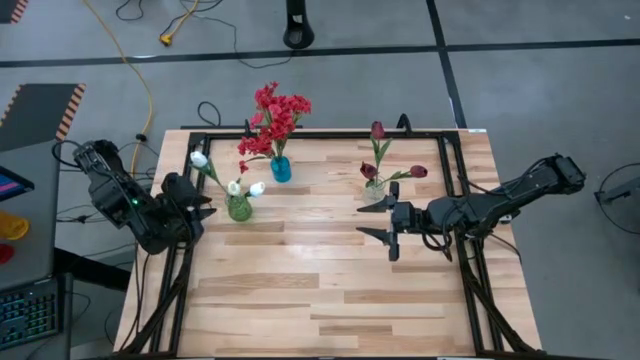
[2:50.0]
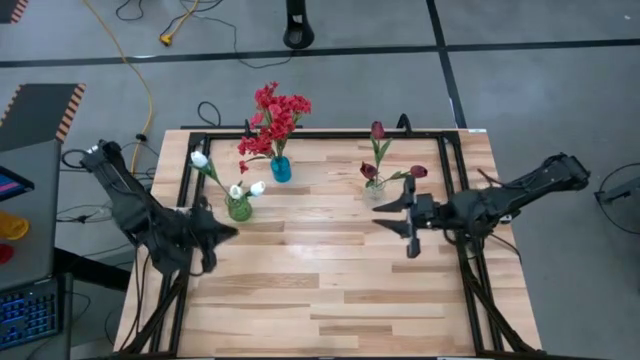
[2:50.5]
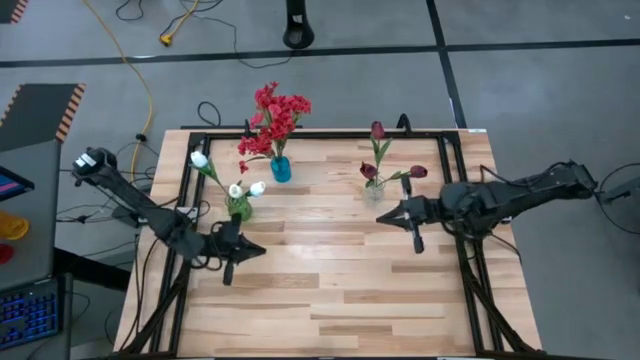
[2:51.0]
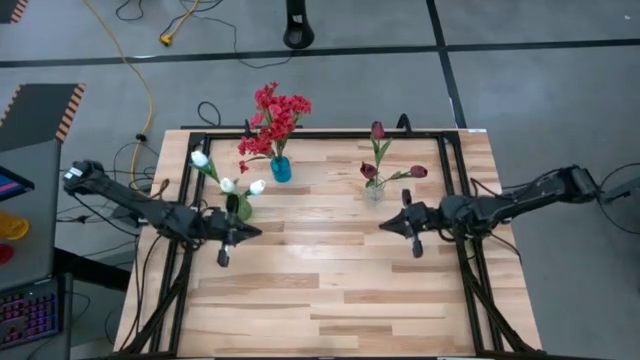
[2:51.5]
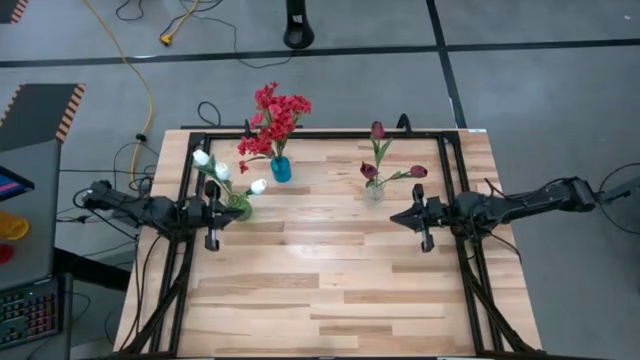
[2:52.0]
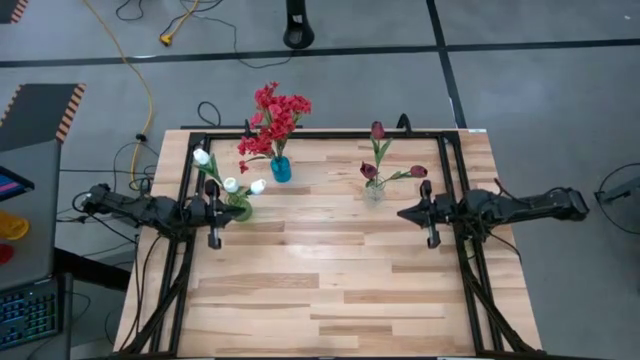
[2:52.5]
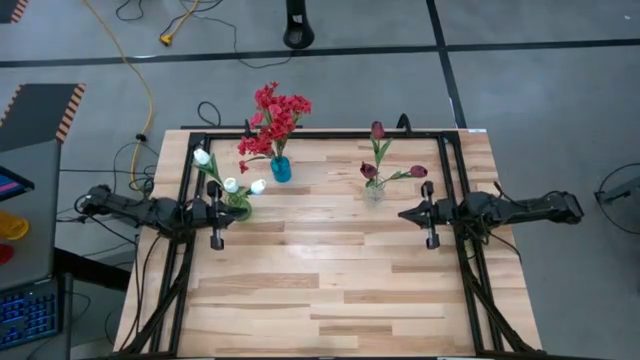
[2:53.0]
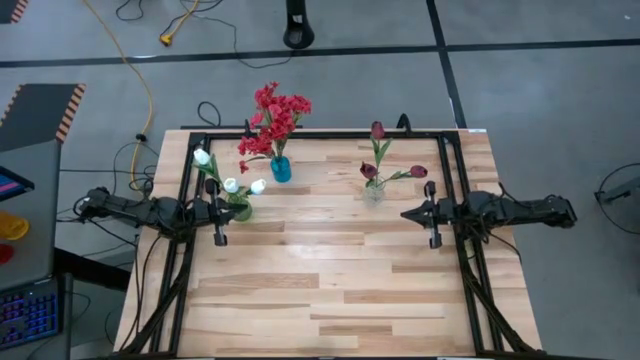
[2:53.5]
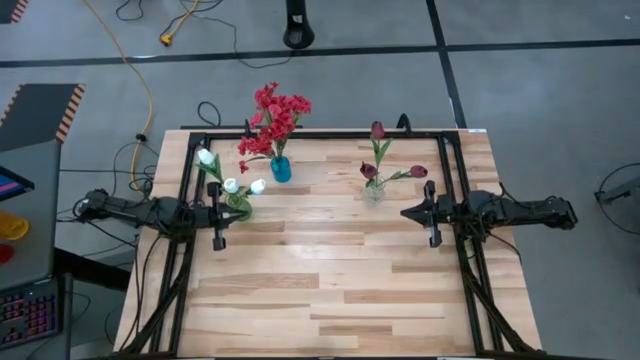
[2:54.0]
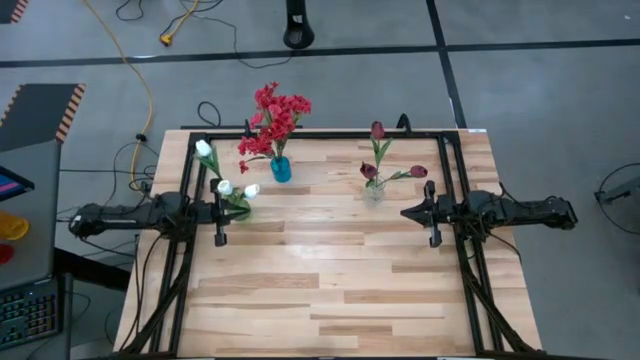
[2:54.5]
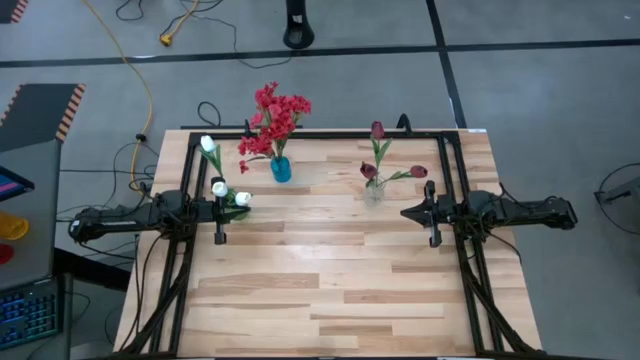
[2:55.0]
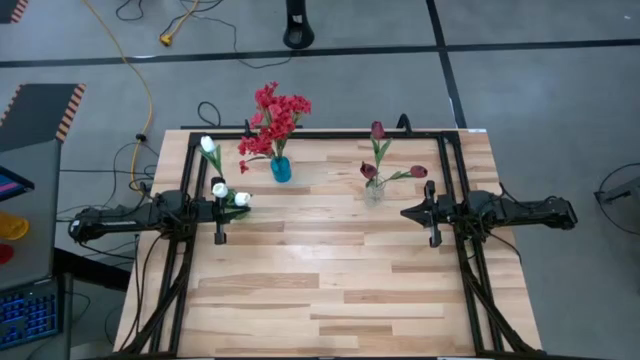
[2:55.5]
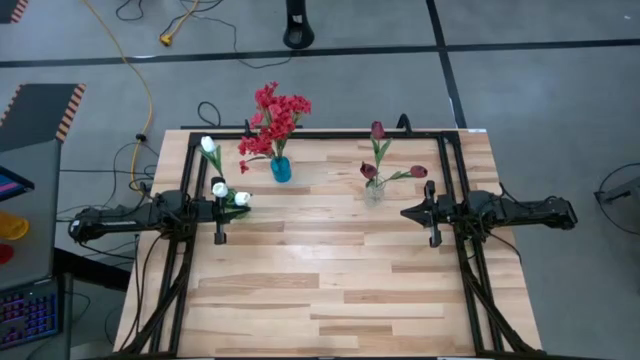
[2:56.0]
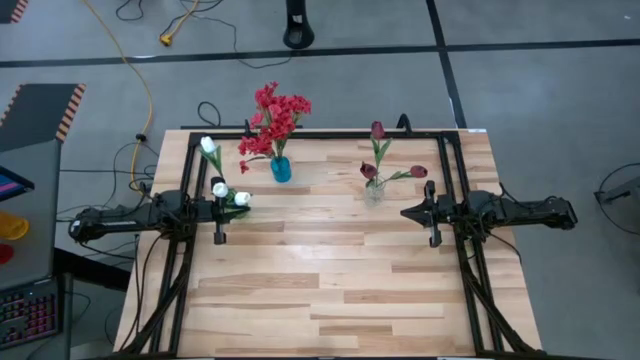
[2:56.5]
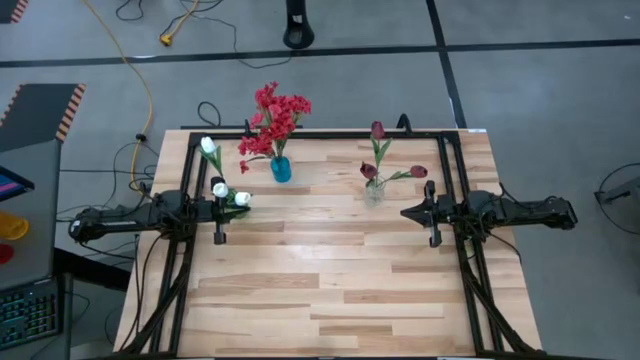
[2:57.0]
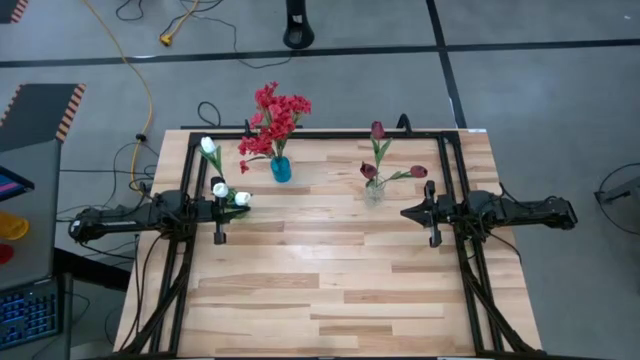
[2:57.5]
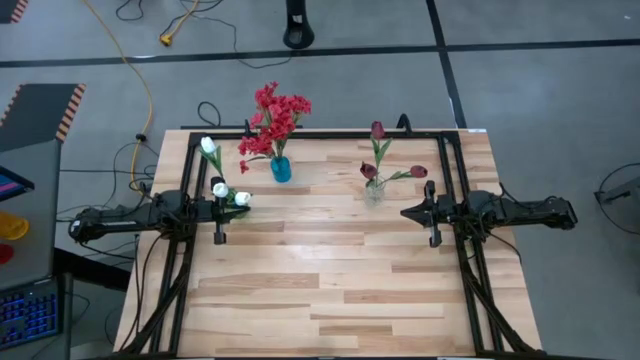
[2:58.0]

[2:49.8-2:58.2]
Task: Sort flowers into vase by color
Return to Home Position

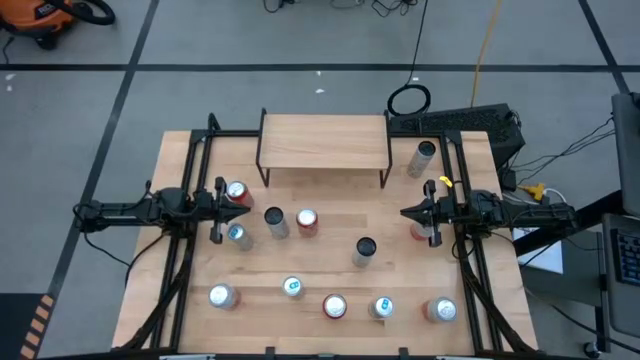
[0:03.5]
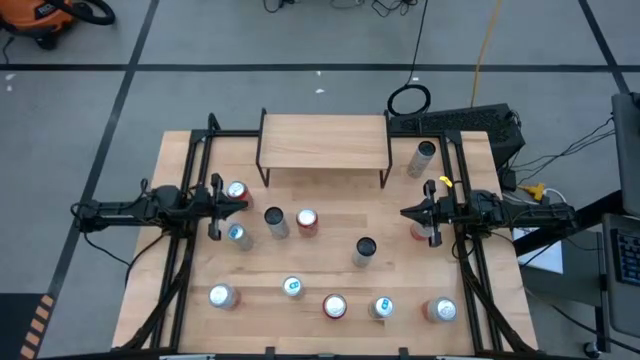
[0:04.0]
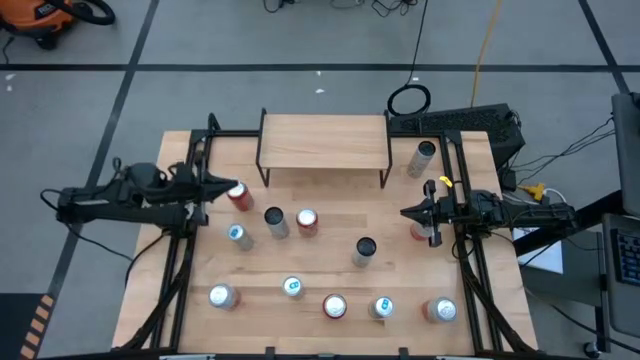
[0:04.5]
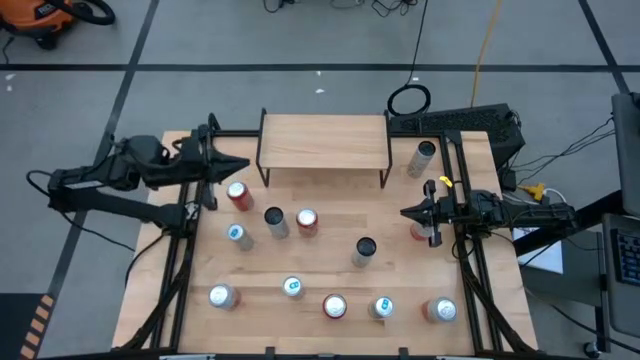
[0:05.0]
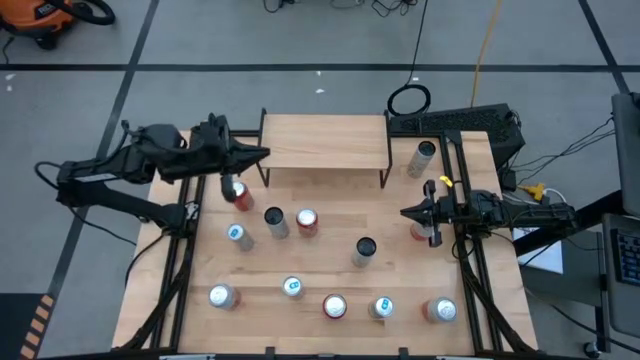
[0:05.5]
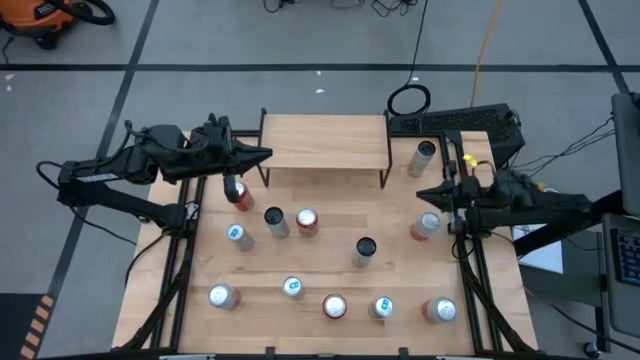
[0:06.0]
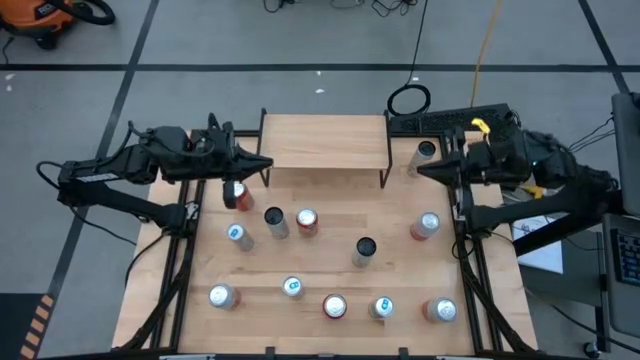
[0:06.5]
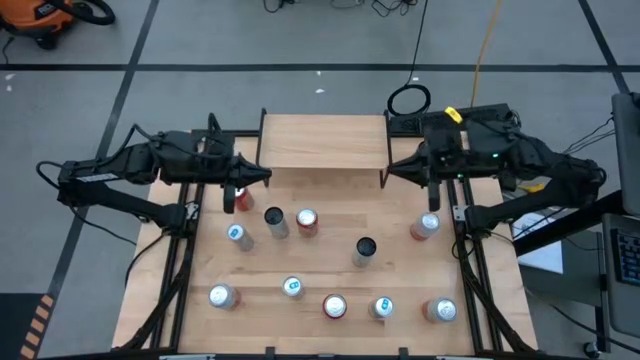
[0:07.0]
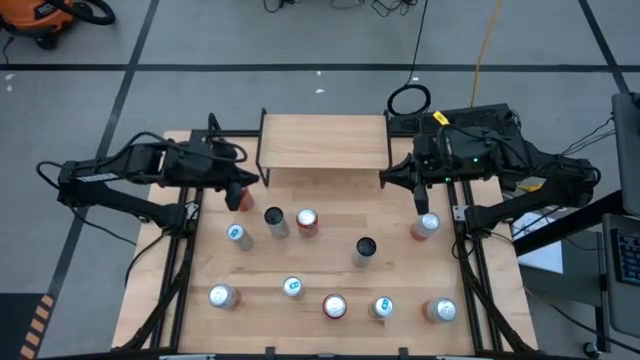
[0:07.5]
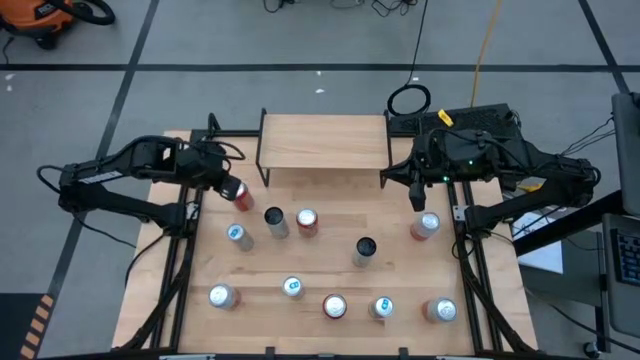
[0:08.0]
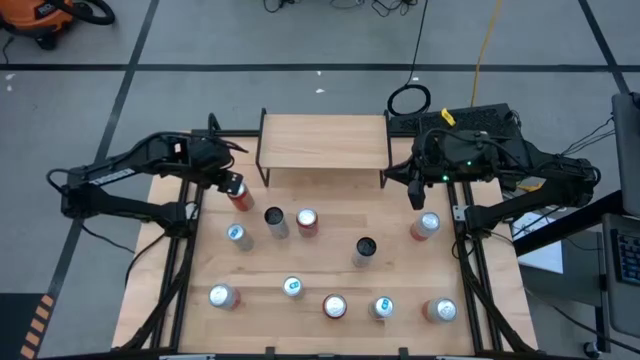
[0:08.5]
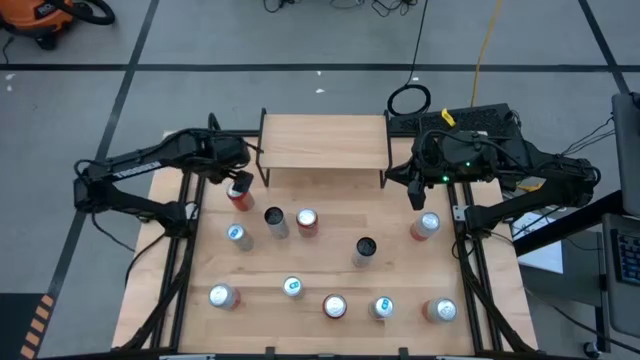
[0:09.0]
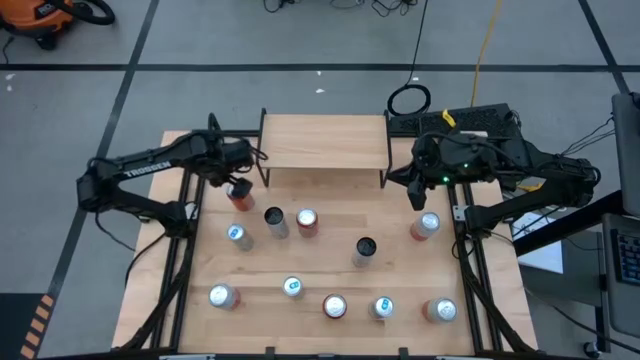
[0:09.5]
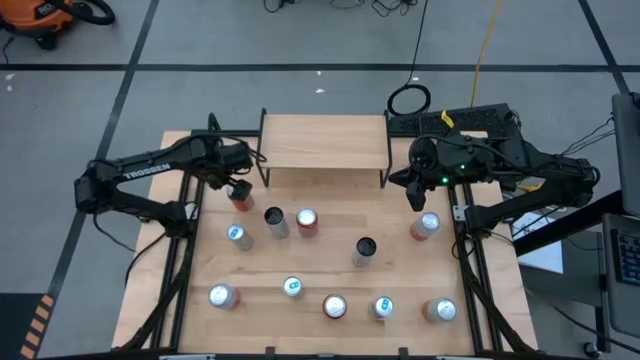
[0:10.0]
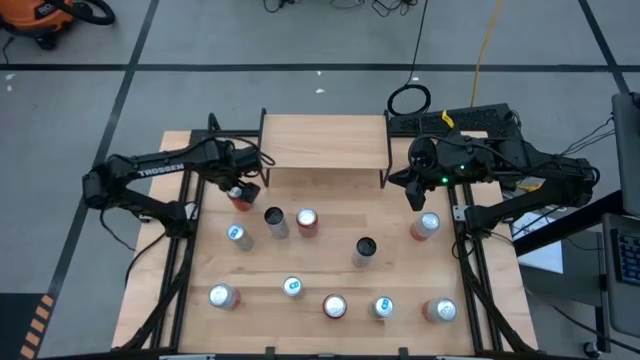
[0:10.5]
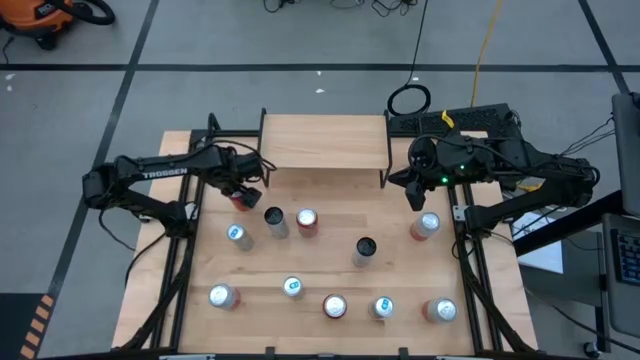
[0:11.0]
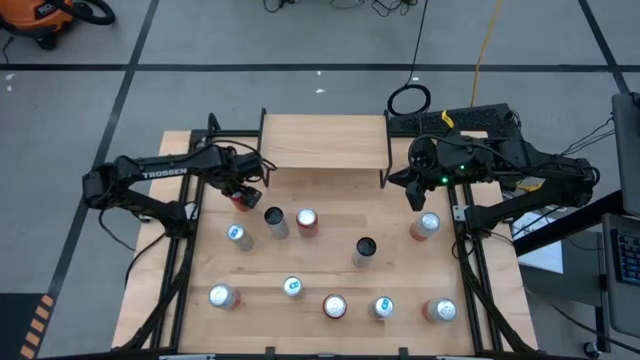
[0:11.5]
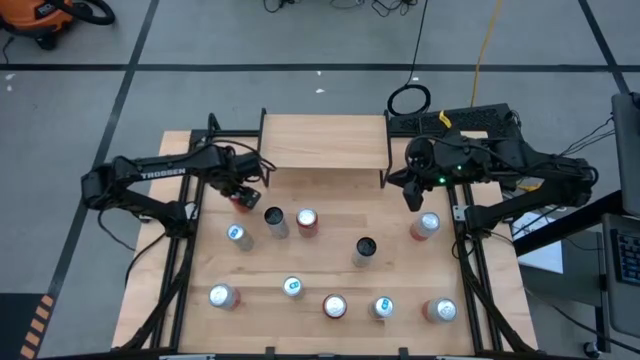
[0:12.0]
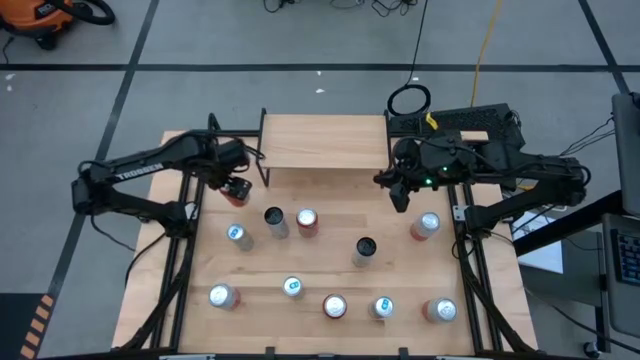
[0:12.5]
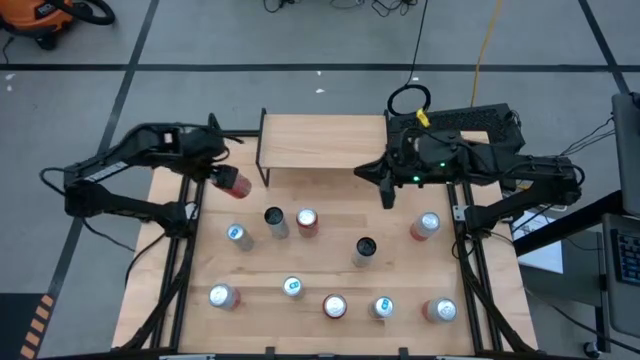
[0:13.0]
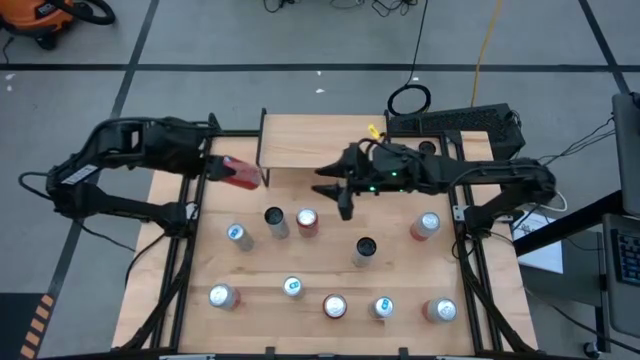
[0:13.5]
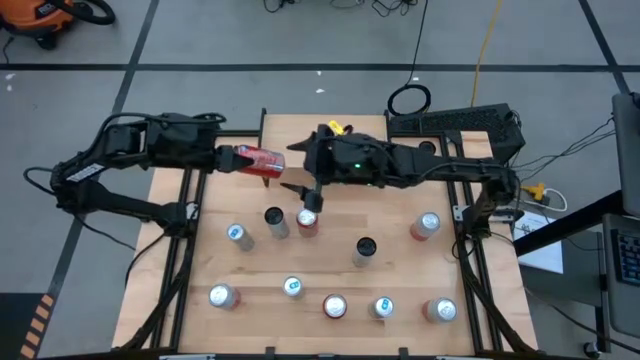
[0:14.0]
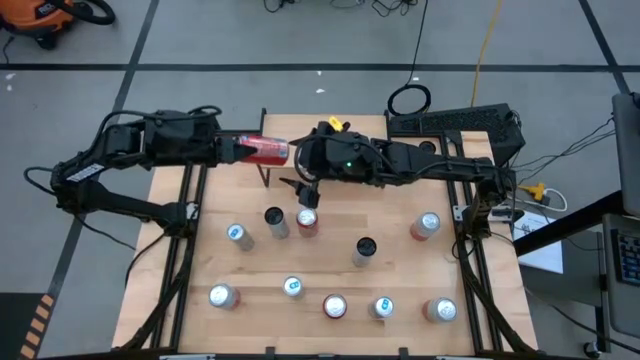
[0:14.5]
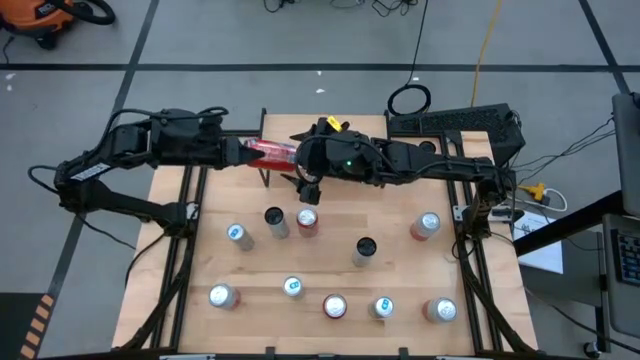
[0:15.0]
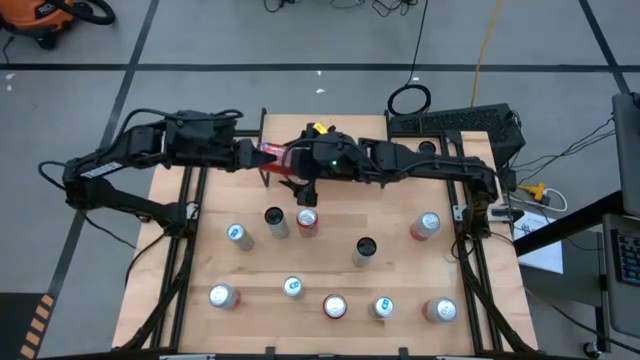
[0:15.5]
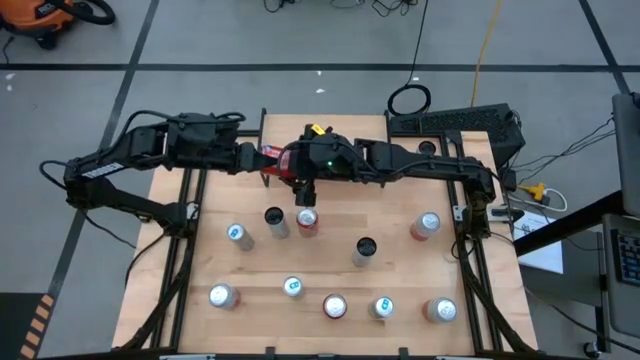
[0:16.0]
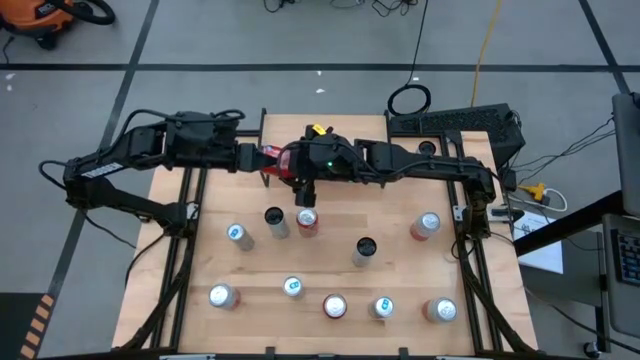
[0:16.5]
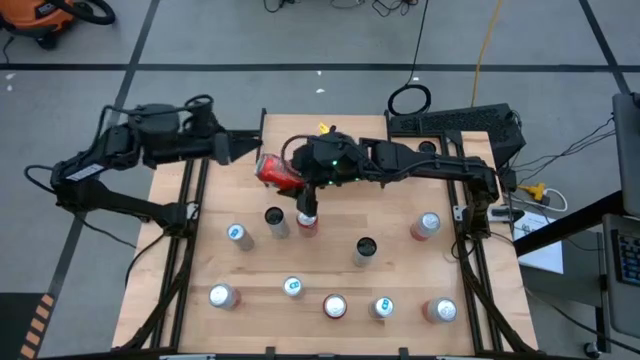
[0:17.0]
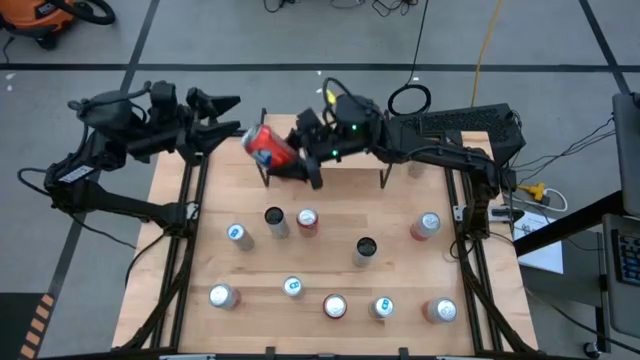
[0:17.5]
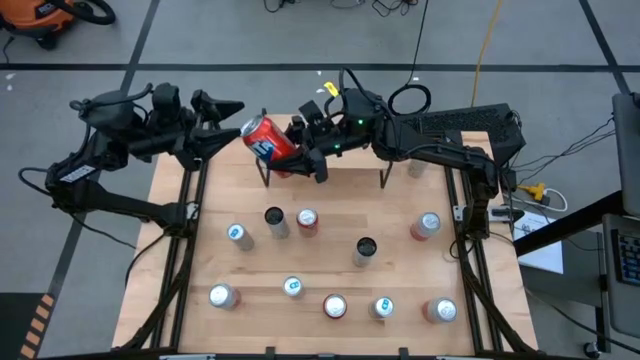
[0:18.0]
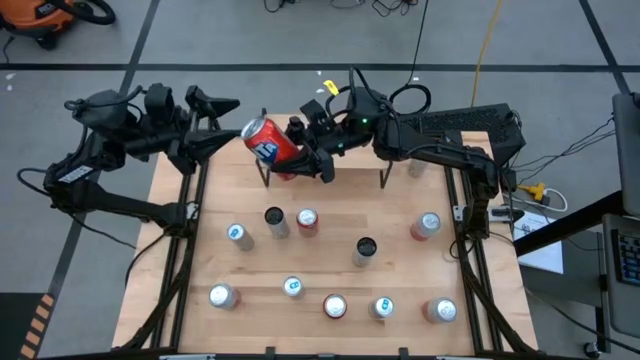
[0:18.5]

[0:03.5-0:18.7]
Task: Place canned beverage on shelf
Put the top left orange soda can on the shelf
